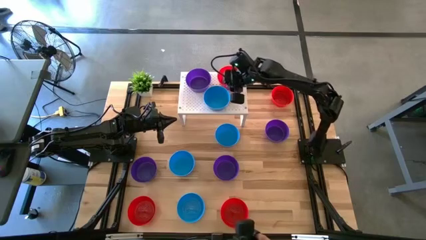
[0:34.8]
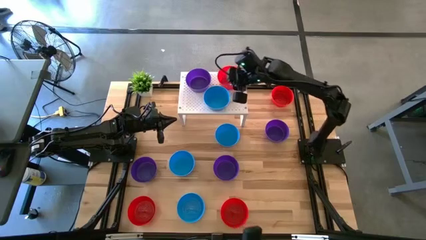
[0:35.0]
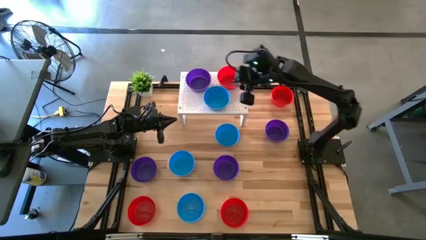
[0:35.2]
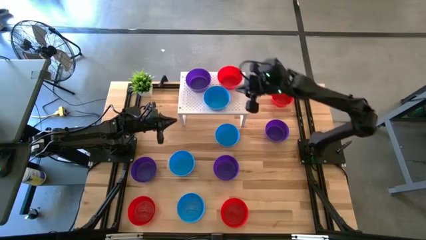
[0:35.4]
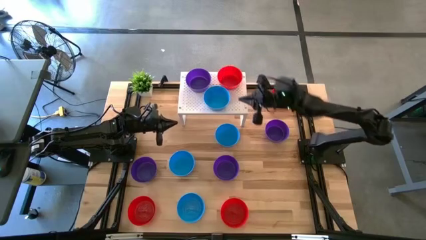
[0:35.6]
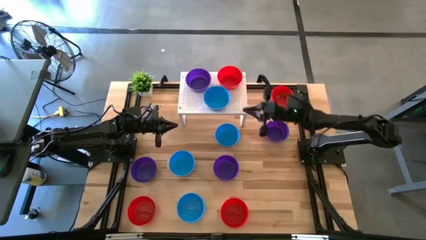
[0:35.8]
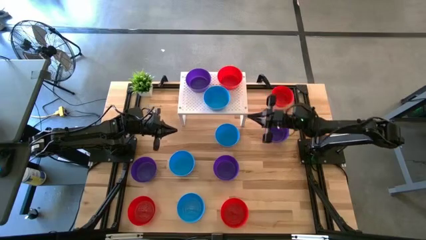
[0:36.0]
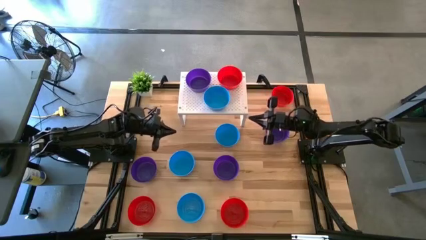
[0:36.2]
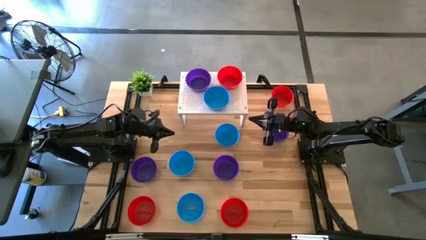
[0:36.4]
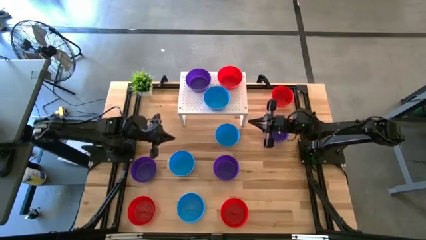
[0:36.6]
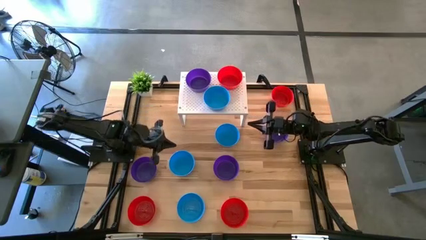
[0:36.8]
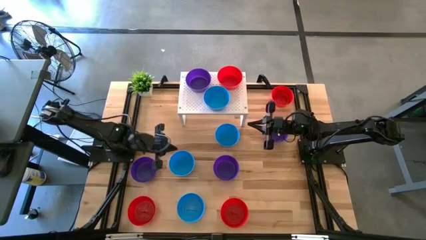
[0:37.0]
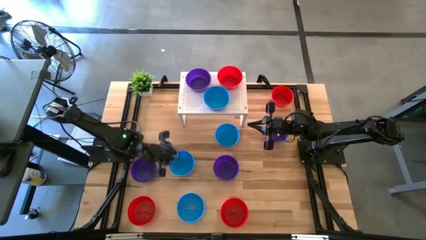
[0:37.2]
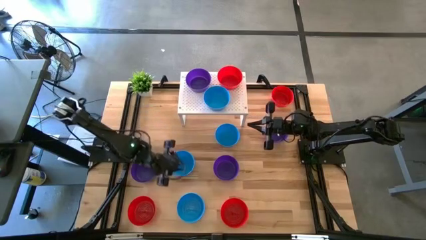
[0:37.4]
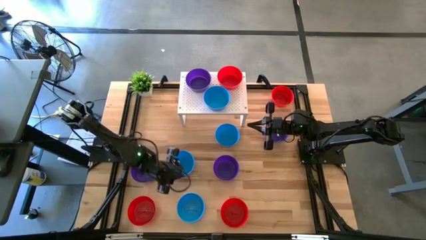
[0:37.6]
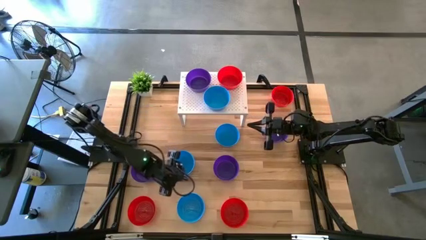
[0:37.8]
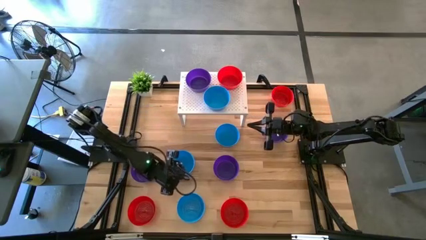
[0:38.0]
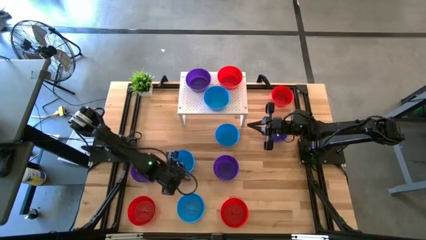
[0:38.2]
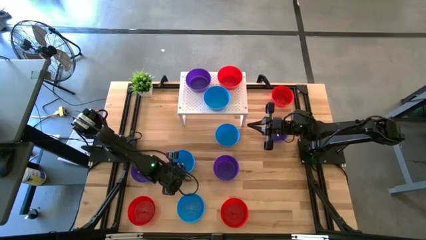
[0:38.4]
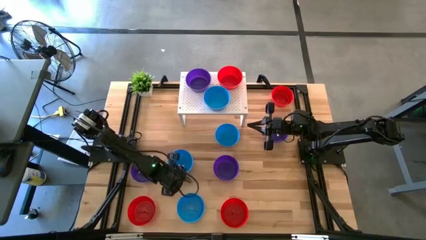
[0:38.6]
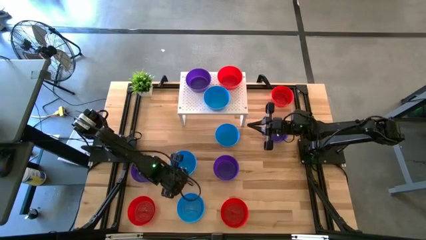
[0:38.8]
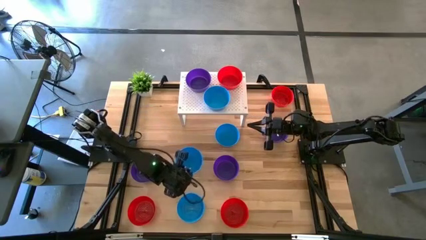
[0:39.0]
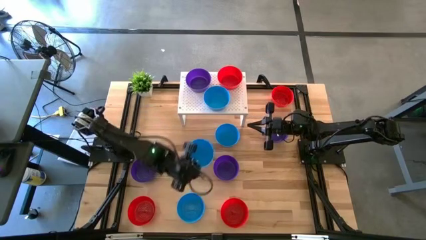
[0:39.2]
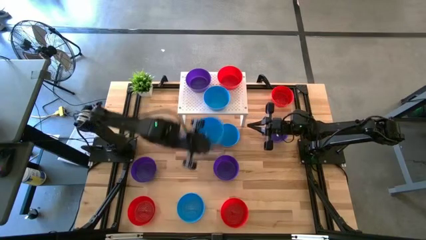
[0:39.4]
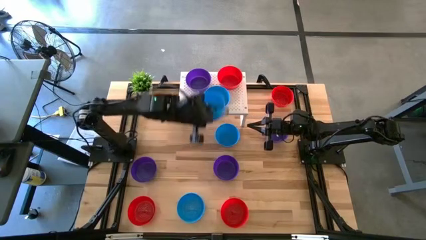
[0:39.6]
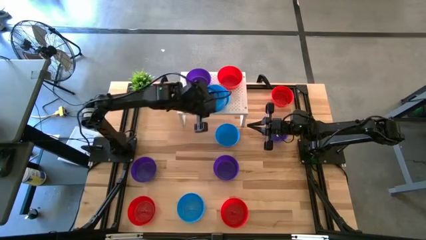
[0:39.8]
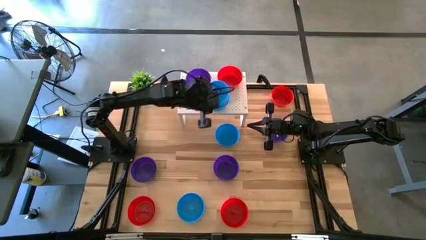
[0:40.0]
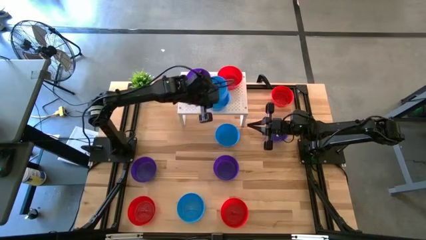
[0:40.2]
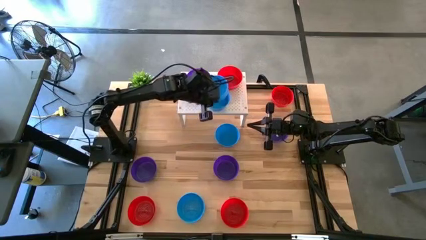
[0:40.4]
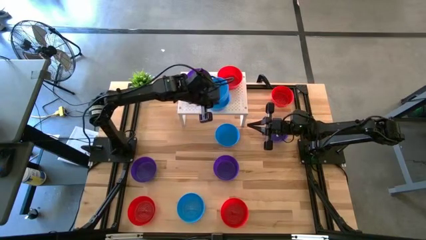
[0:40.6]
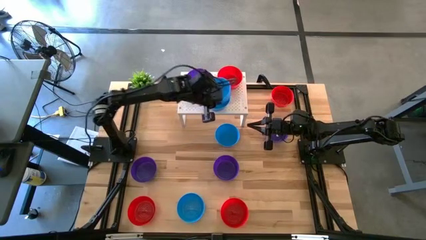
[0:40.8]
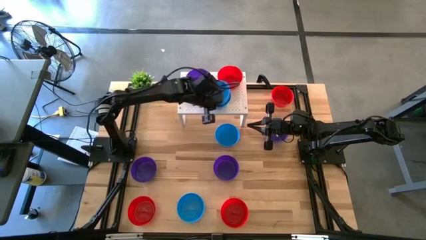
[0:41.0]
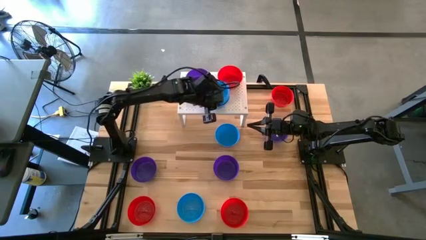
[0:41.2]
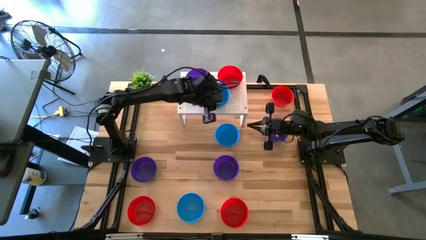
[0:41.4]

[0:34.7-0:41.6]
Task: Pick & Place Mini bowls
Stack the blue bowl on the blue bowl on the shelf

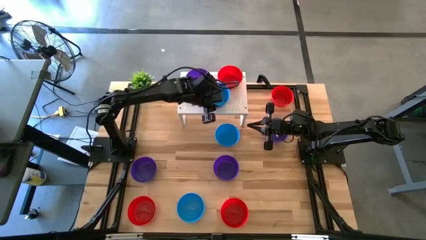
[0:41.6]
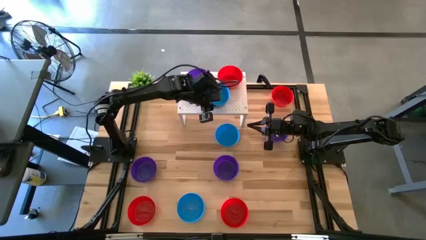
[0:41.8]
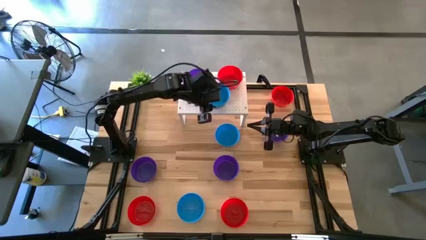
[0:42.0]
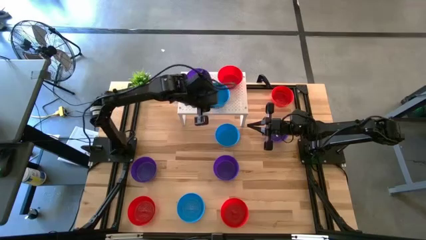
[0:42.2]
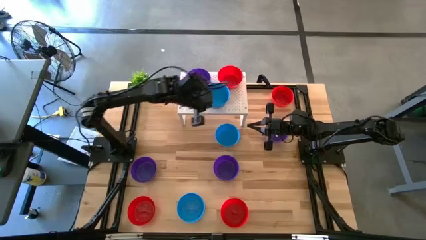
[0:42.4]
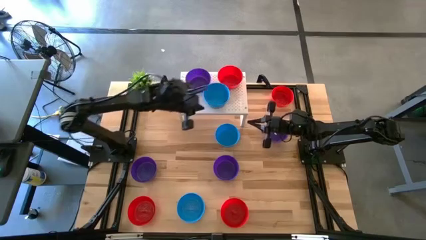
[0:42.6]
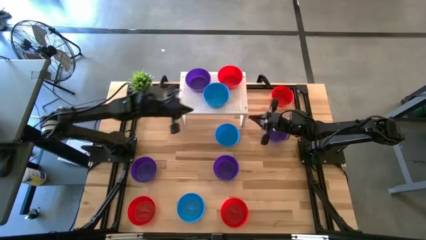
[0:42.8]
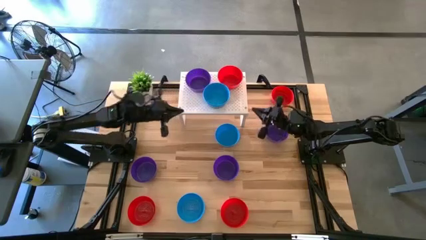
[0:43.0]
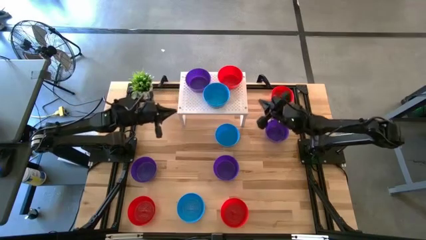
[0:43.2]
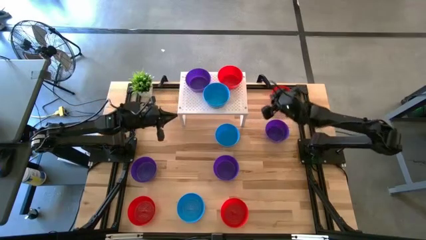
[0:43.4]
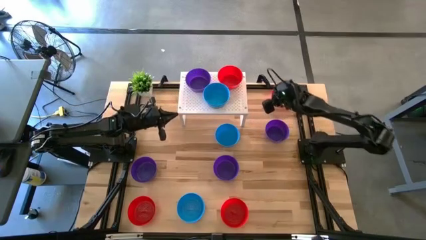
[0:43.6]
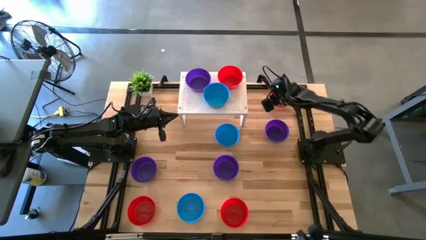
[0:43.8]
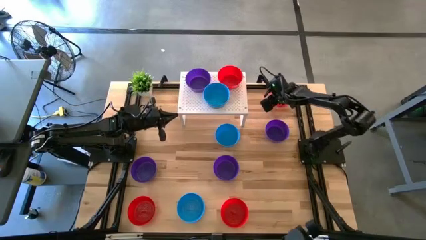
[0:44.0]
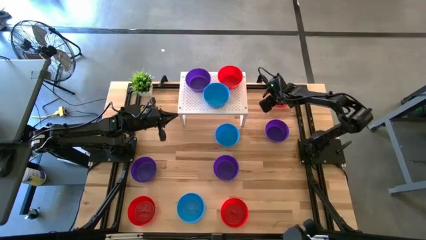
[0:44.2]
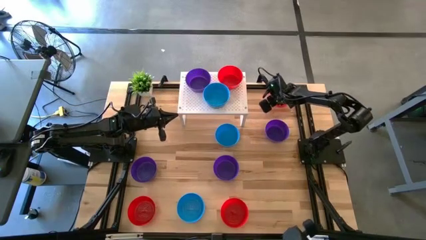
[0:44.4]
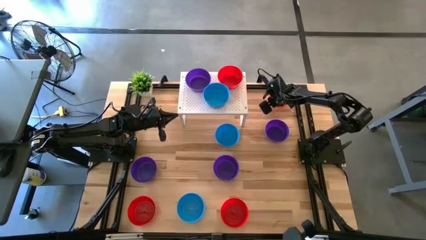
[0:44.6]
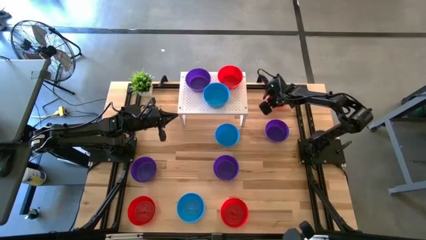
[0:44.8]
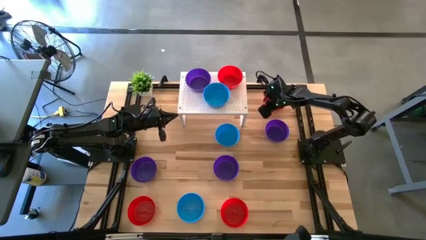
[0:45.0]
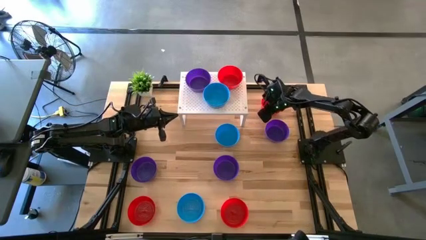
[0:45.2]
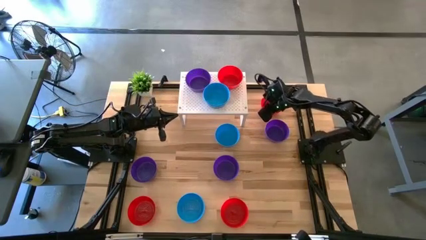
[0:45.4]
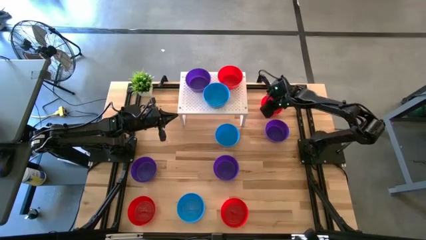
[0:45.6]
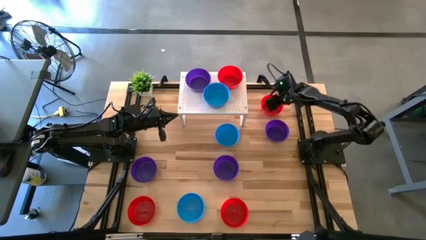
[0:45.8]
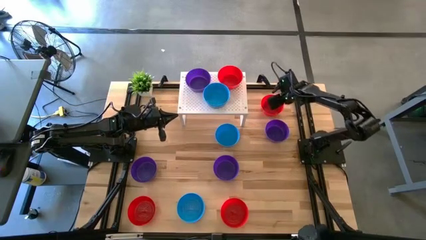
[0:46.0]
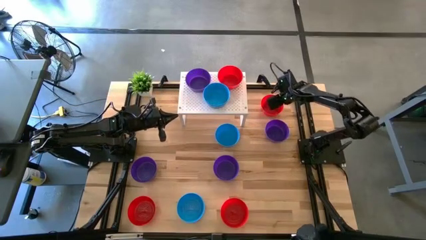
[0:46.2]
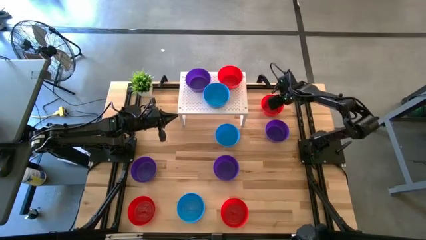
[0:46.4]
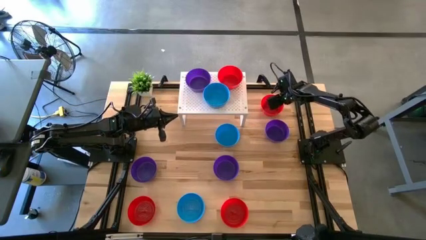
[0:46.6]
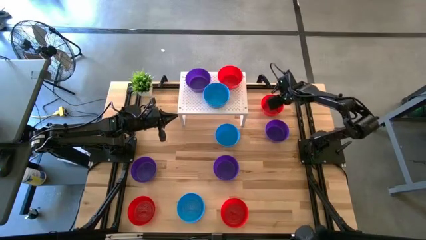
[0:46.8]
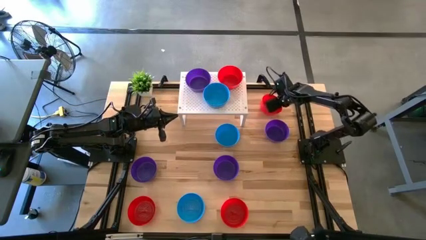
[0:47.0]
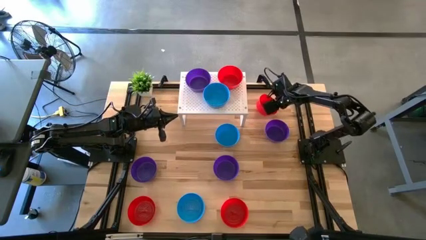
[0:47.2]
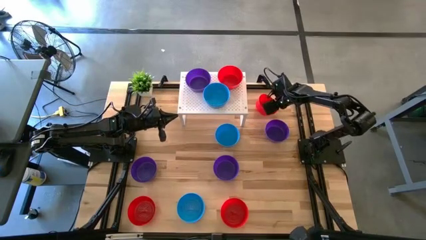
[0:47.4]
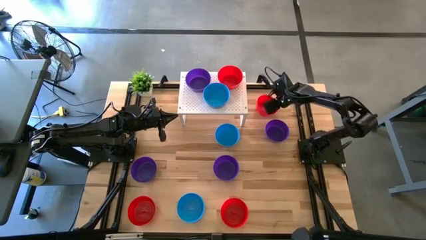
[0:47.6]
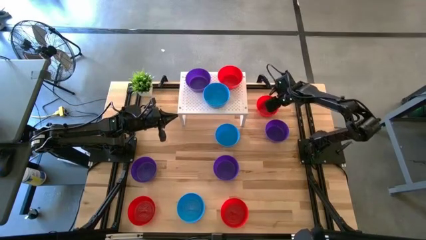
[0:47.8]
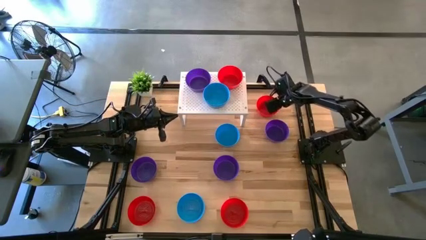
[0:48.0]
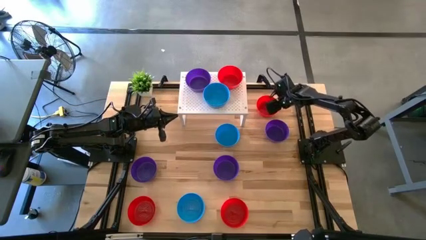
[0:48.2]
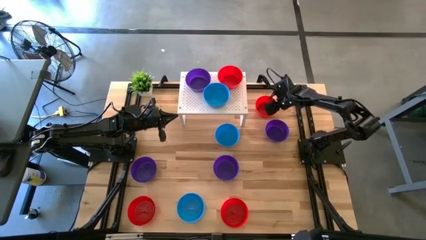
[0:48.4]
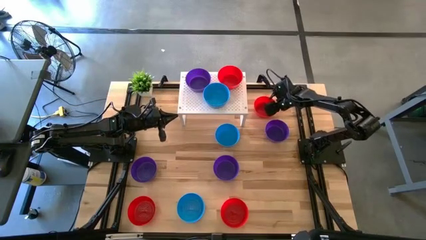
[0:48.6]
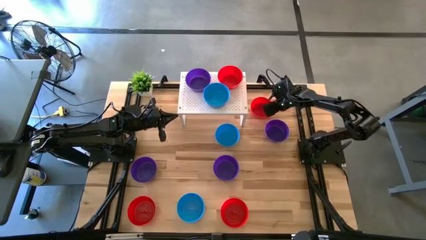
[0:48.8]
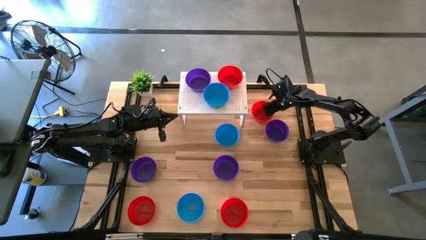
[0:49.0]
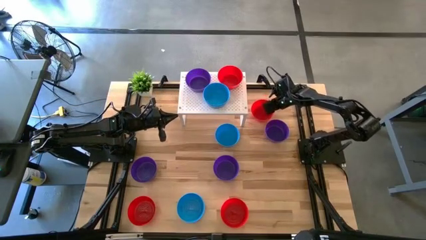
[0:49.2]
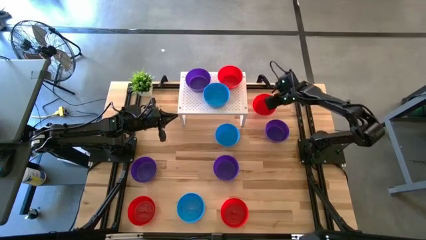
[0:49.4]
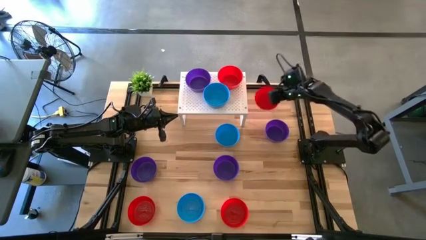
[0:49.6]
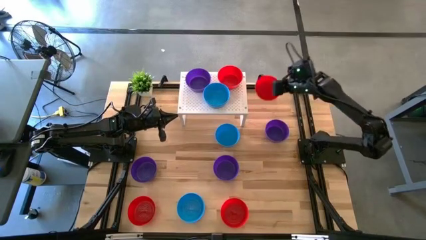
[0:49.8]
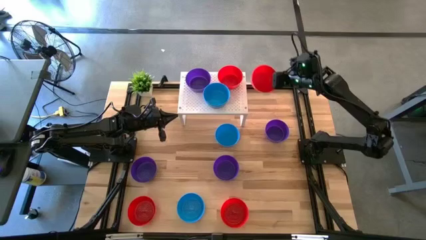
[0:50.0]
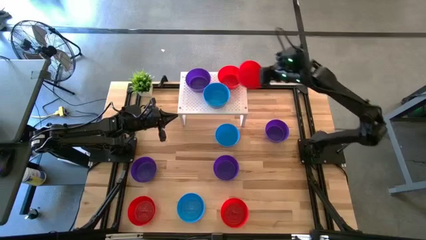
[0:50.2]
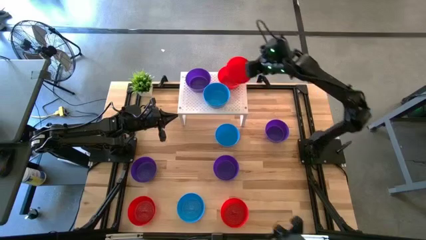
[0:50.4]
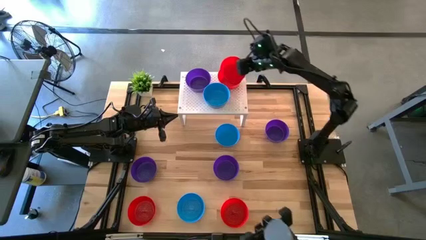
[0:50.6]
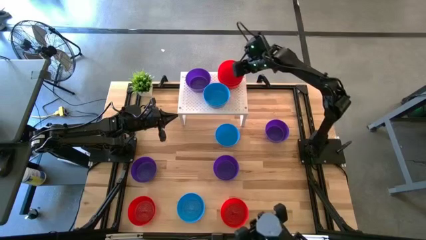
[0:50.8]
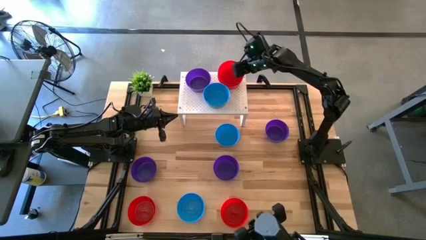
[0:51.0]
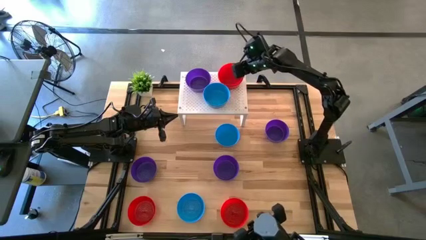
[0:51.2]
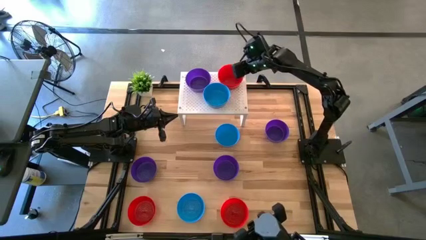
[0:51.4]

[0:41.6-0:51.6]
Stack the red bowl on the red bowl on the shelf
